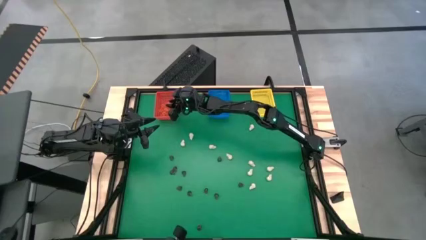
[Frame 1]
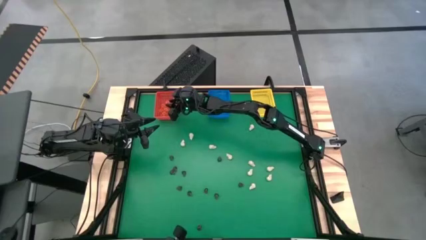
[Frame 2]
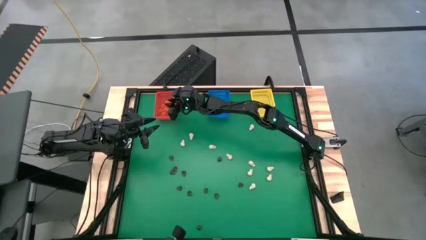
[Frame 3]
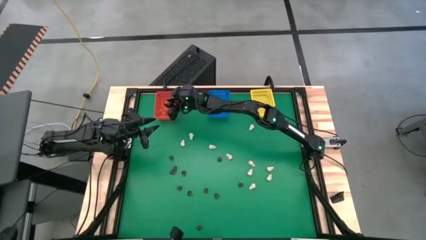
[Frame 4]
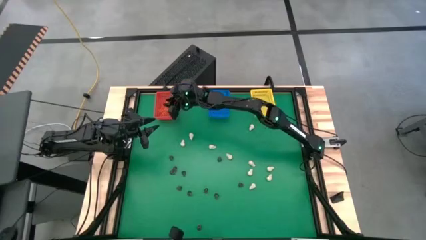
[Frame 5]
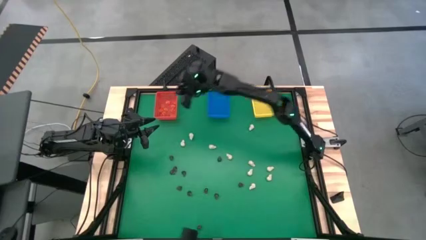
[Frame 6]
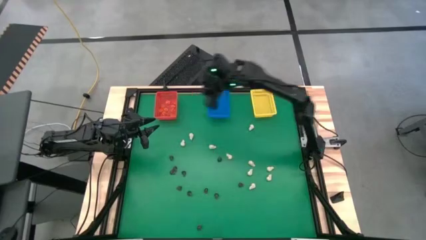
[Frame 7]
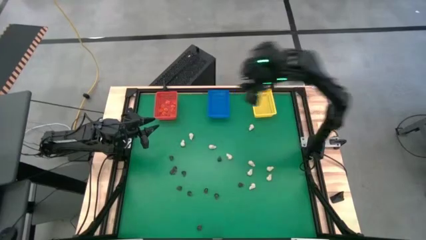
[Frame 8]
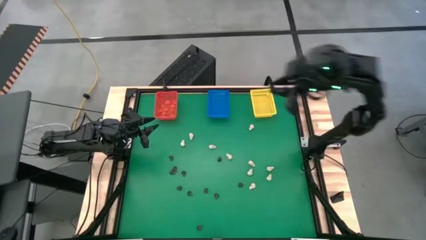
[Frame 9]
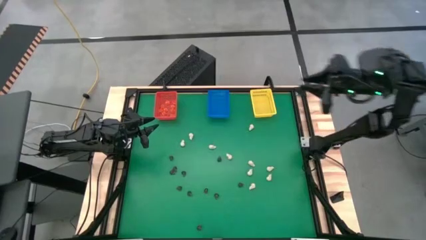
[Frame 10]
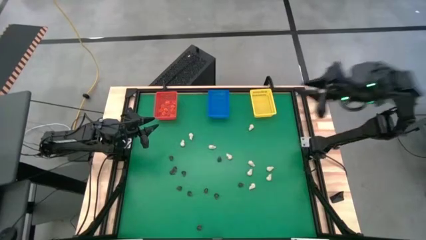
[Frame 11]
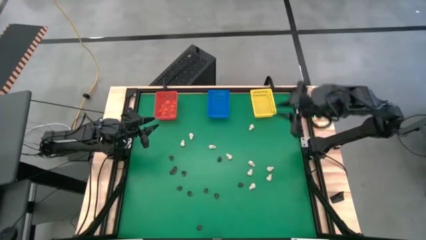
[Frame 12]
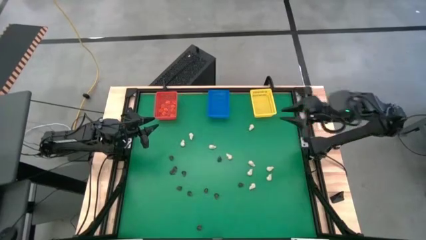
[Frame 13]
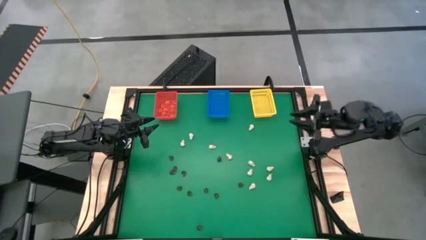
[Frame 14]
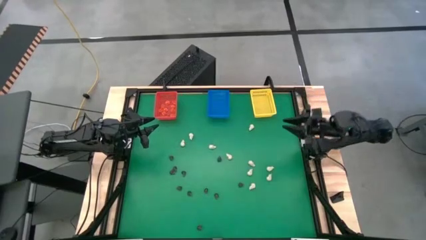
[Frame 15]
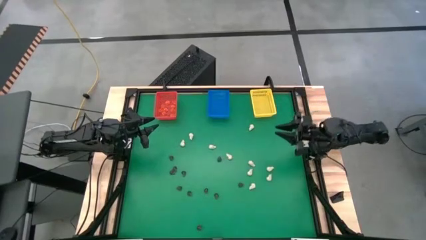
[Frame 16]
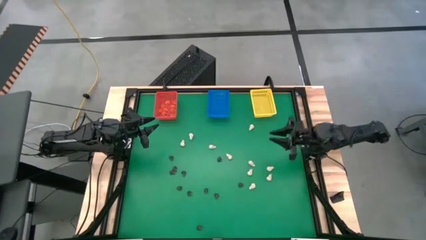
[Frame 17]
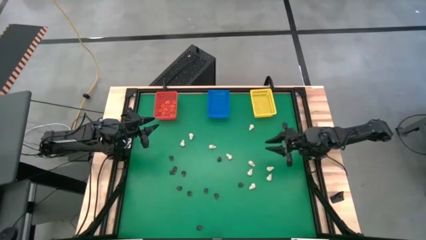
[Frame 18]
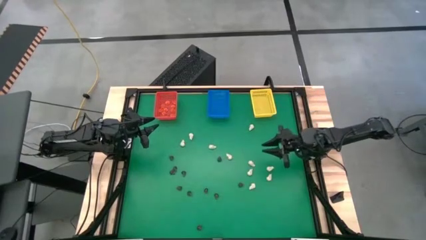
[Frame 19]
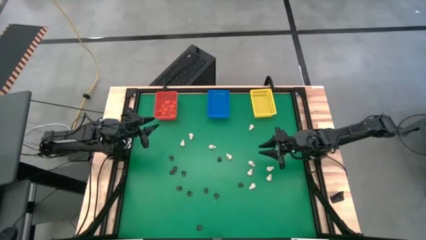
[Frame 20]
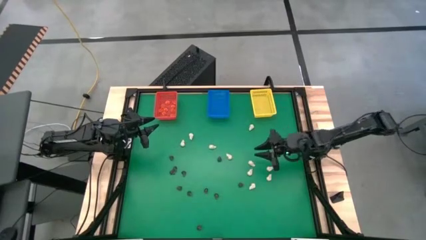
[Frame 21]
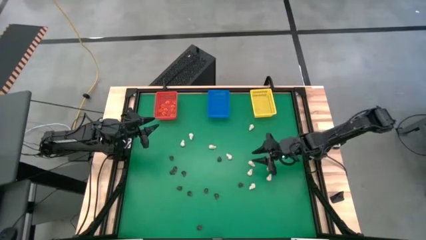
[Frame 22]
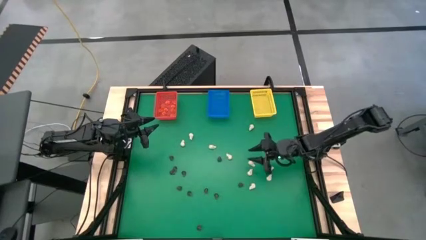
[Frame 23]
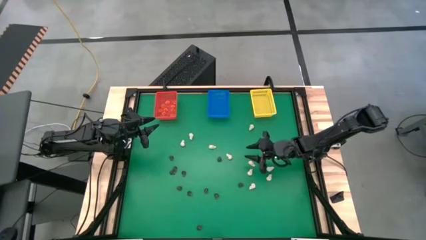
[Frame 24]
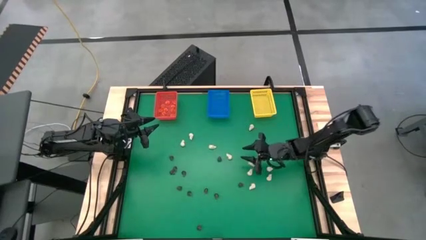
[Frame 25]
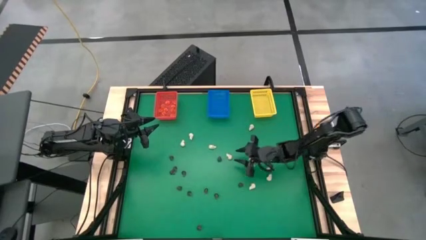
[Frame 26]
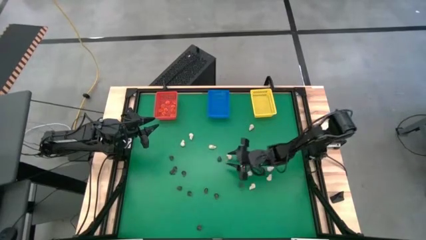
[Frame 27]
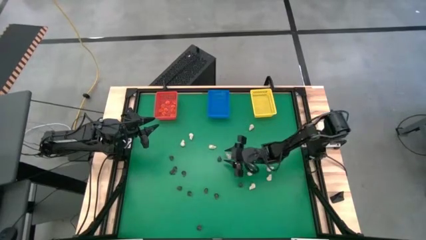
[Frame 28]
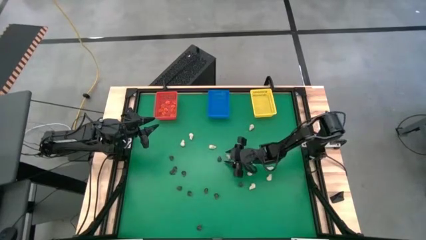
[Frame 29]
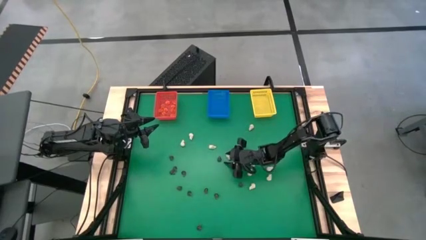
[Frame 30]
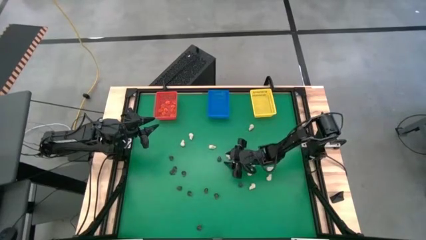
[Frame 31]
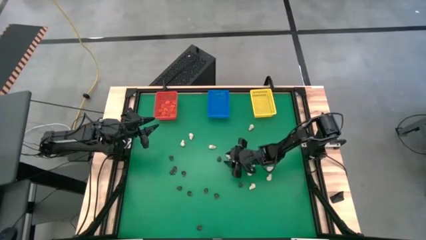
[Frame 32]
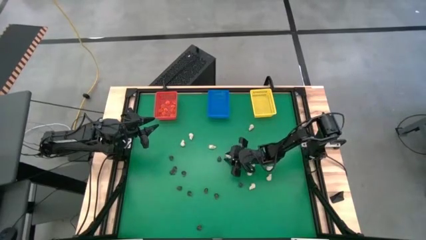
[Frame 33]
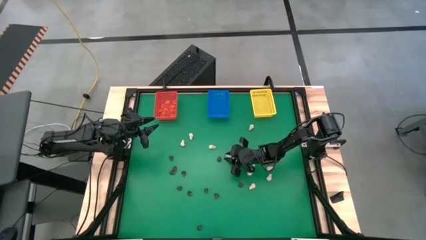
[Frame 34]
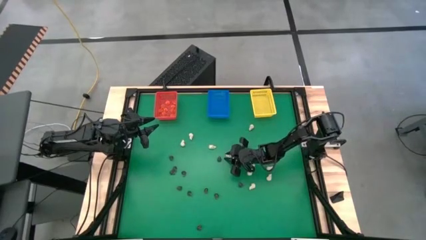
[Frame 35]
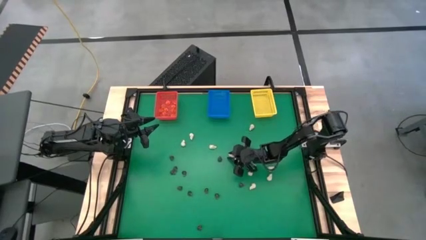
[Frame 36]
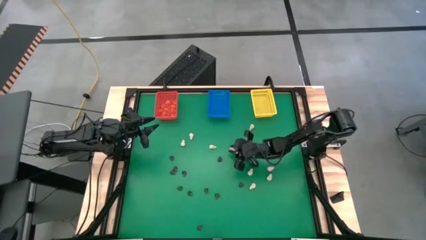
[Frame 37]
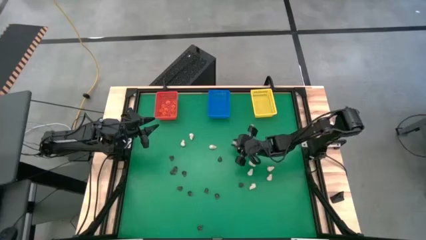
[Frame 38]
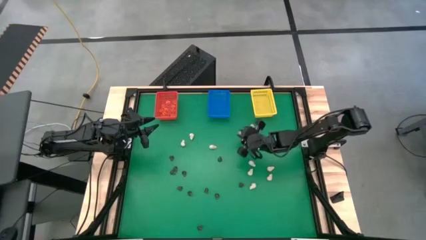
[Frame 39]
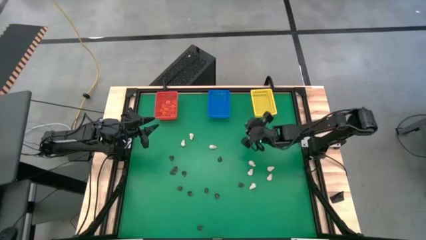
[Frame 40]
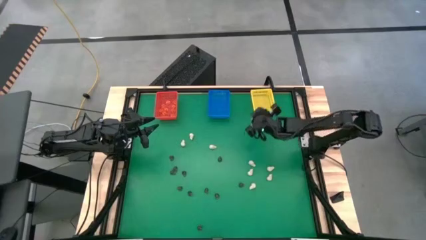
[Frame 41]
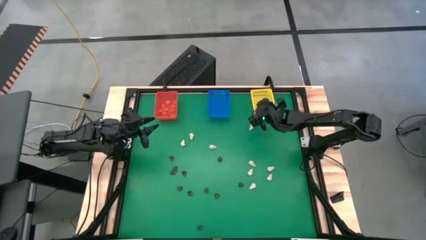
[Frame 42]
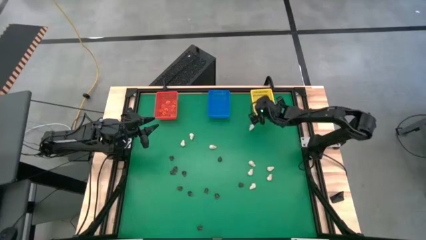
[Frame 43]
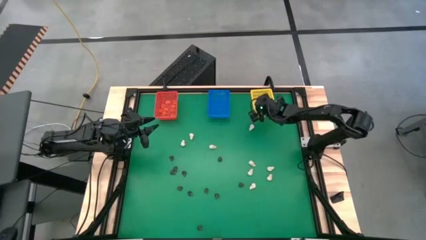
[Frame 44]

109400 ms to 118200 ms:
Task: Sort Halloween decoration
Put the white skull toy into the yellow bin

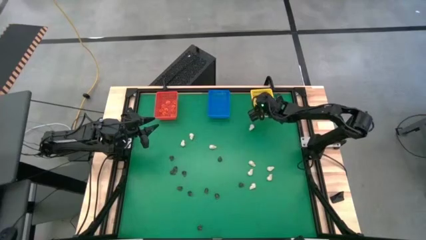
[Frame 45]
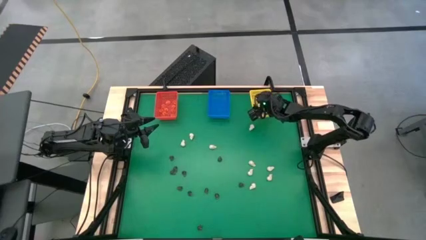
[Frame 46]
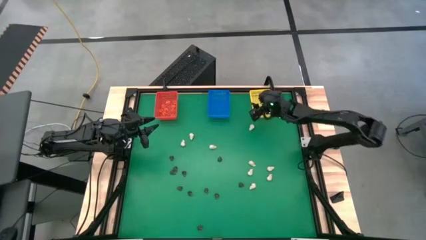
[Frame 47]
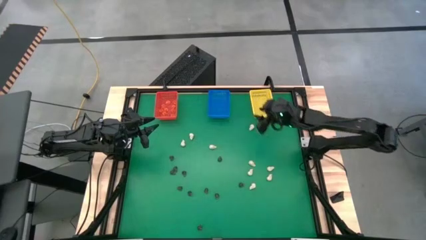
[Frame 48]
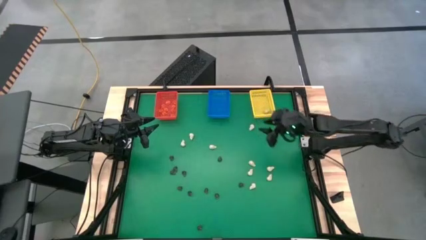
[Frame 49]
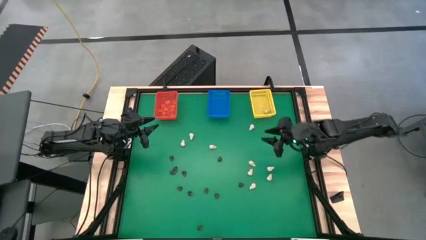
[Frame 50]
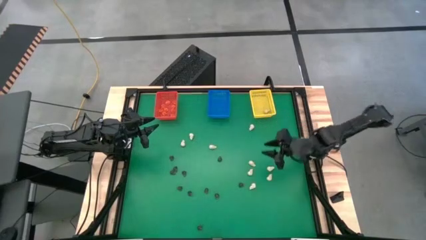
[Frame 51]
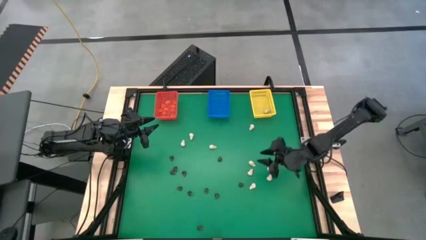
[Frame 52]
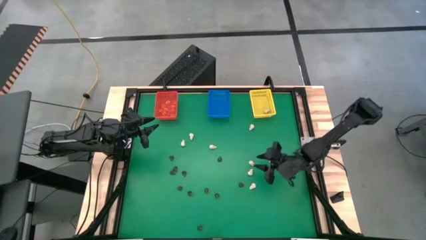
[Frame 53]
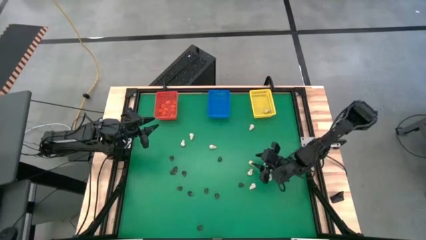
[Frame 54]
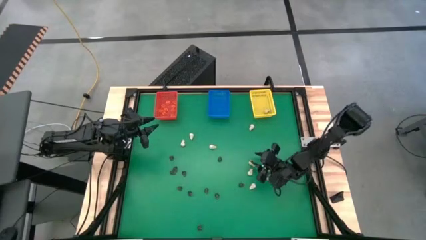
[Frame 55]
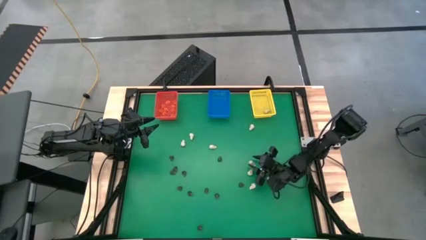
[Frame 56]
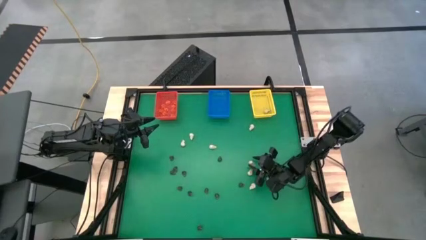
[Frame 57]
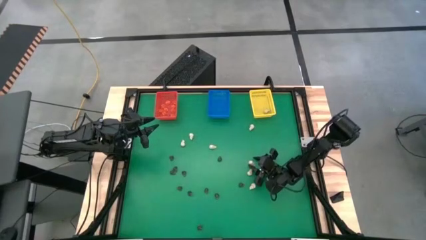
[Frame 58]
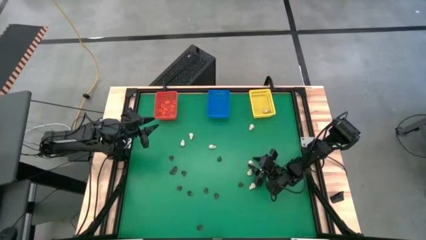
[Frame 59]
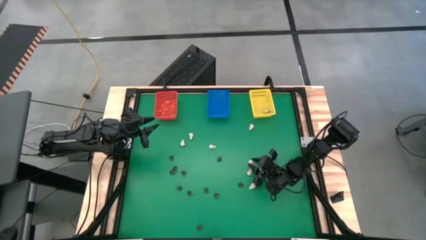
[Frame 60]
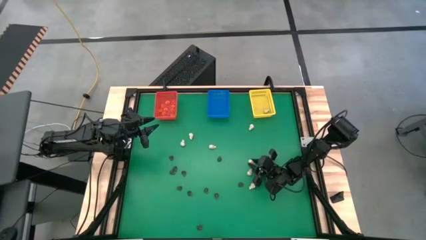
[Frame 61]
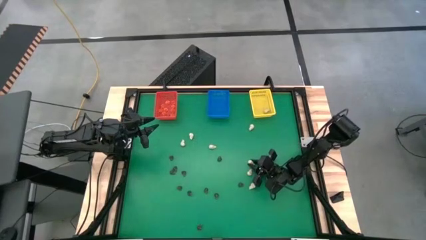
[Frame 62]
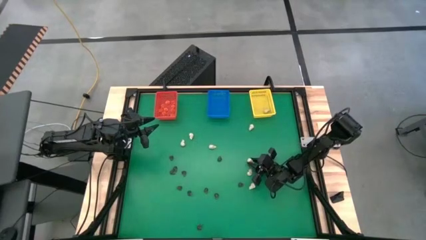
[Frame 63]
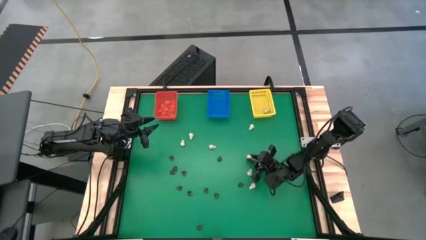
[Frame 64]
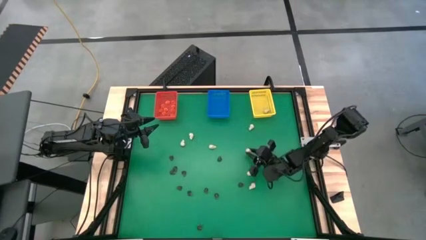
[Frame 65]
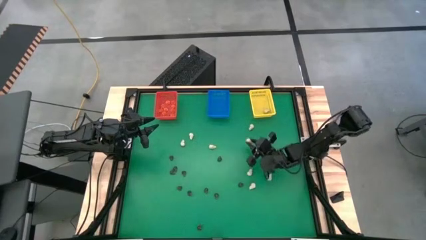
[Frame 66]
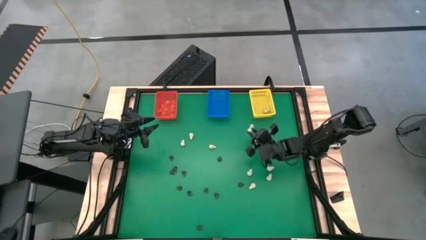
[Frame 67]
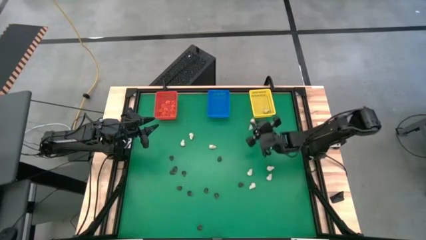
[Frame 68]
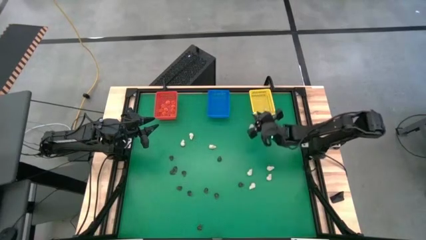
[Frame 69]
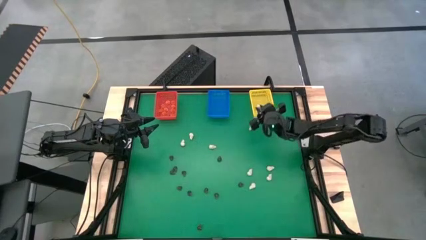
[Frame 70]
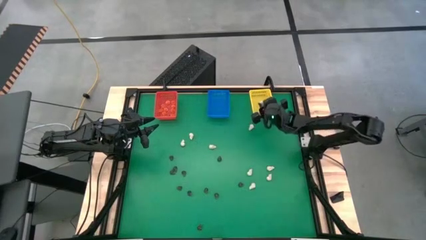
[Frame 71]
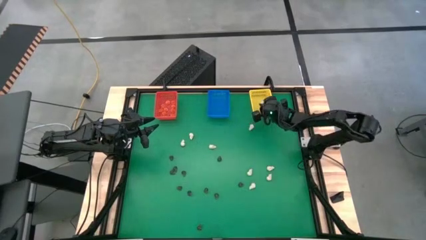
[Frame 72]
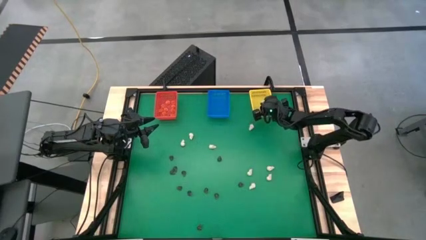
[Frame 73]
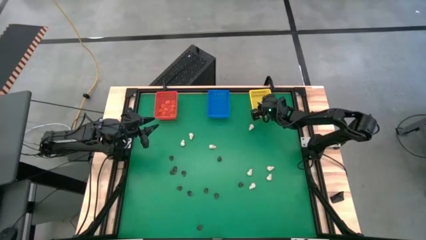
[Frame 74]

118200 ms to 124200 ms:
Put the white skull toy into the yellow bin

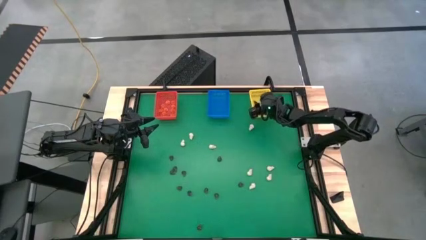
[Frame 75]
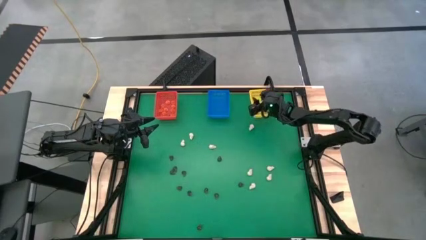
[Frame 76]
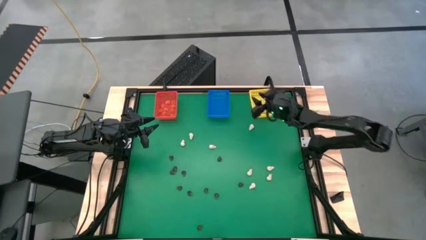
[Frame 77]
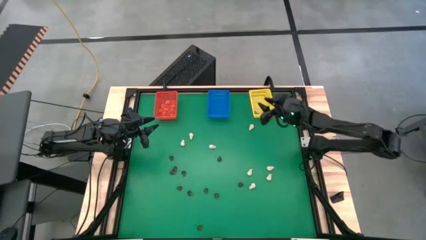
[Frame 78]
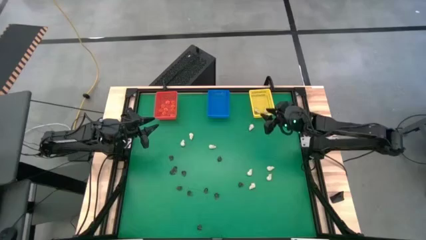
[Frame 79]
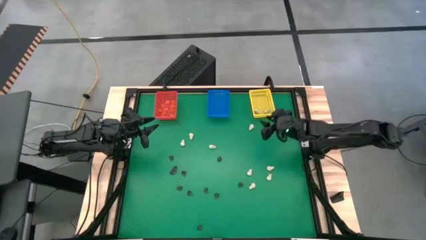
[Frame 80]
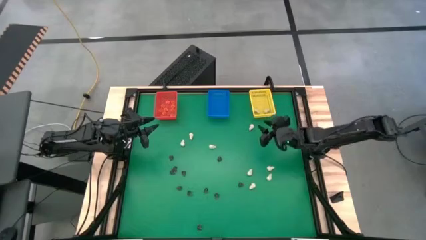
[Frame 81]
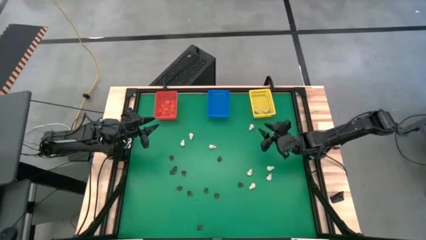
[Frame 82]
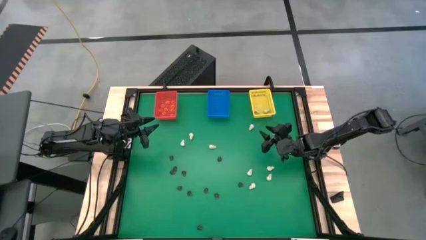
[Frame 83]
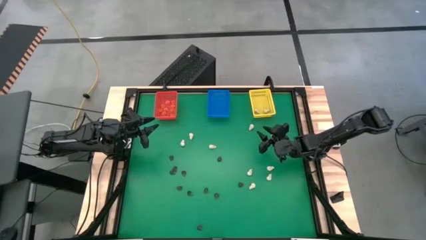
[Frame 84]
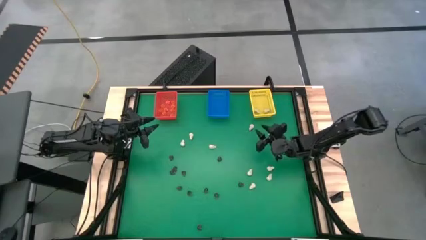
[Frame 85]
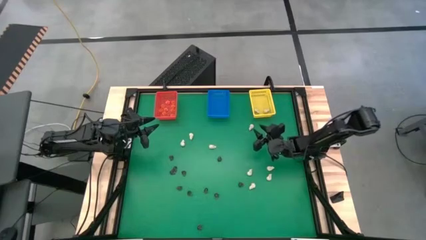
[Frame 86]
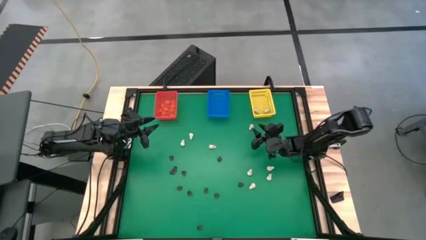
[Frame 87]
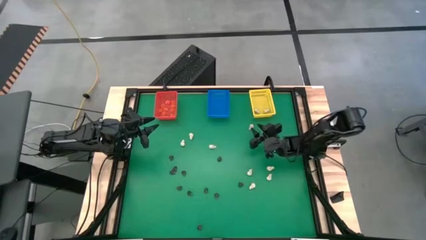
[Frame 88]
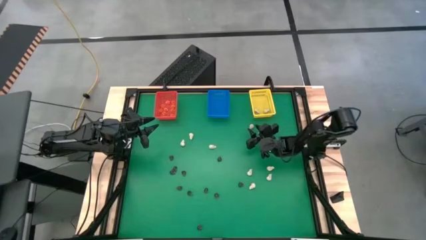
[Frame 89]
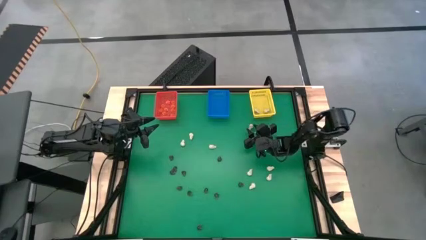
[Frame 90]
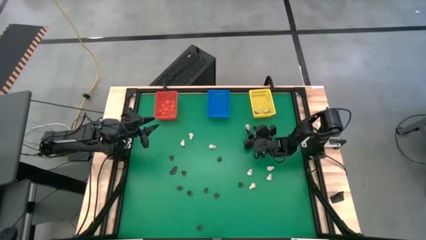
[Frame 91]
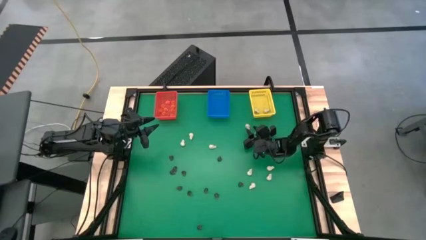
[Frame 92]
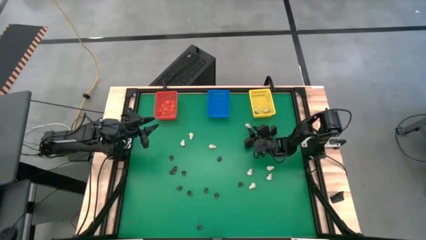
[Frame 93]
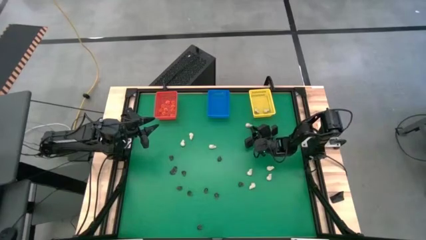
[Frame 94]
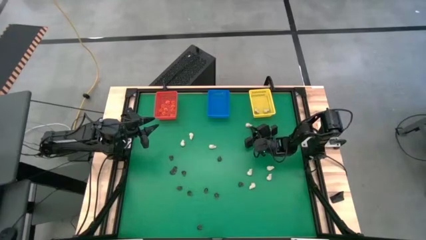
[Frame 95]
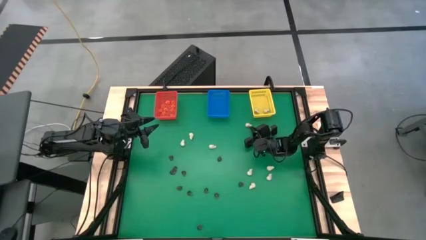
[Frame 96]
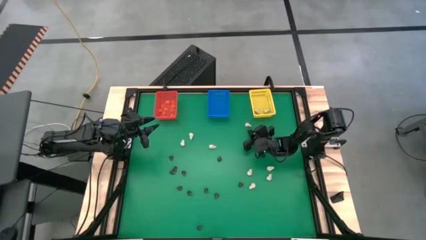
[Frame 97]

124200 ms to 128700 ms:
Put the white skull toy into the yellow bin
